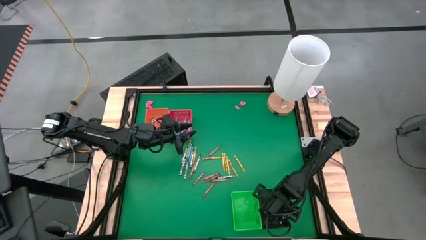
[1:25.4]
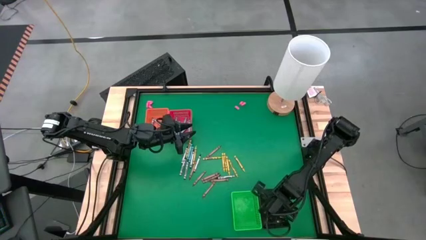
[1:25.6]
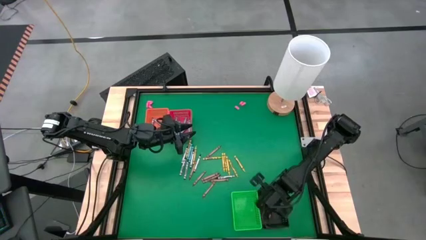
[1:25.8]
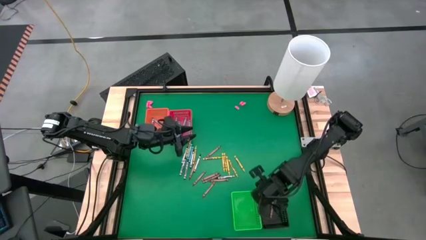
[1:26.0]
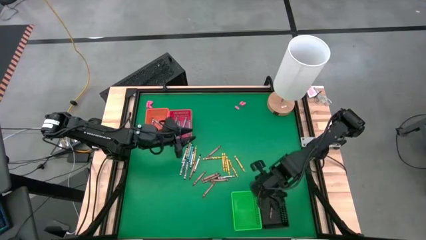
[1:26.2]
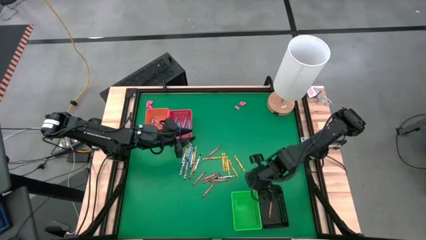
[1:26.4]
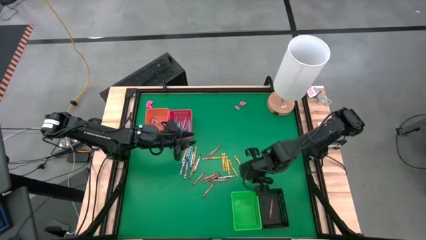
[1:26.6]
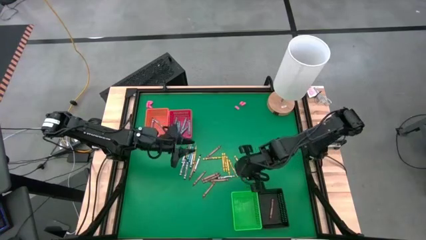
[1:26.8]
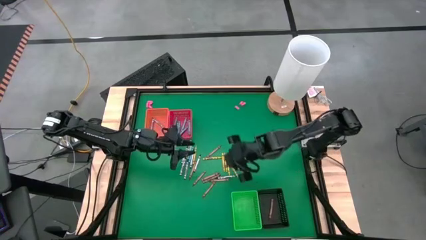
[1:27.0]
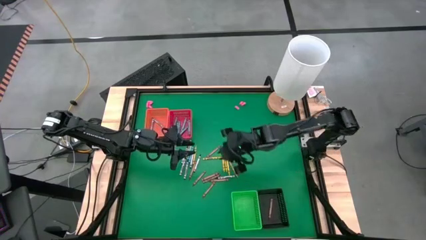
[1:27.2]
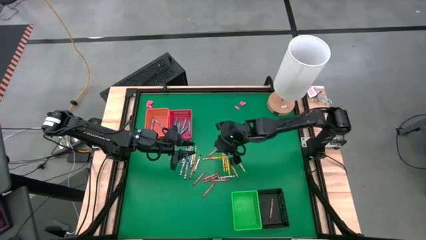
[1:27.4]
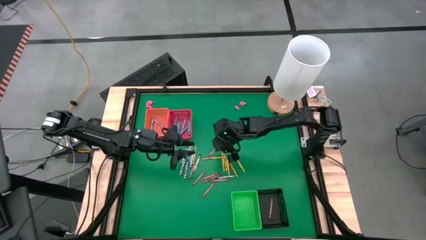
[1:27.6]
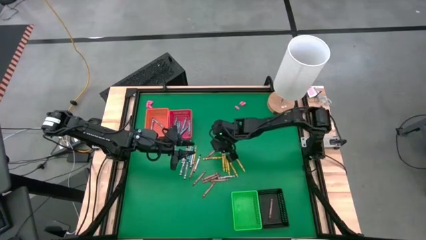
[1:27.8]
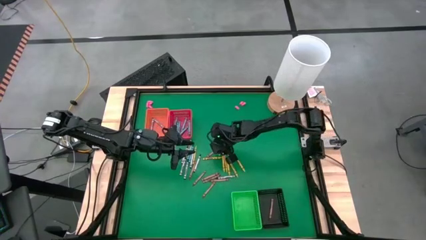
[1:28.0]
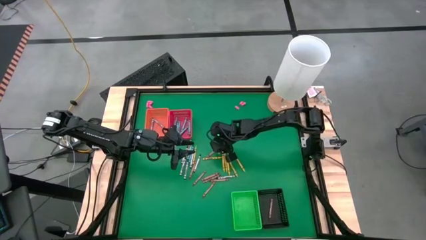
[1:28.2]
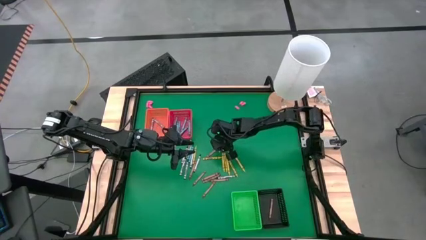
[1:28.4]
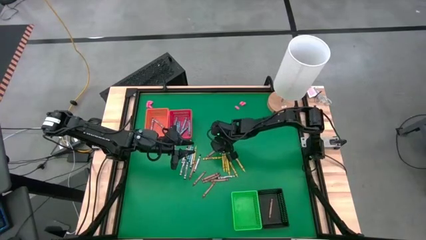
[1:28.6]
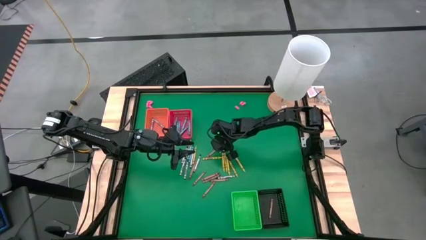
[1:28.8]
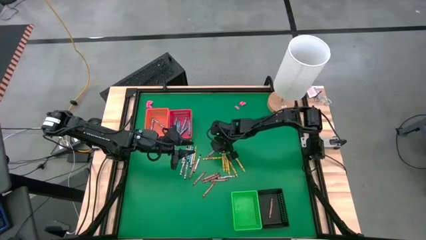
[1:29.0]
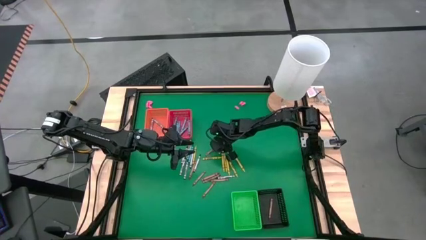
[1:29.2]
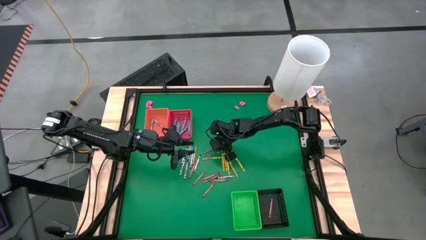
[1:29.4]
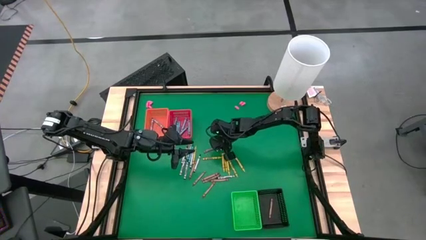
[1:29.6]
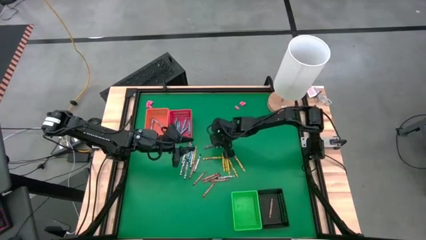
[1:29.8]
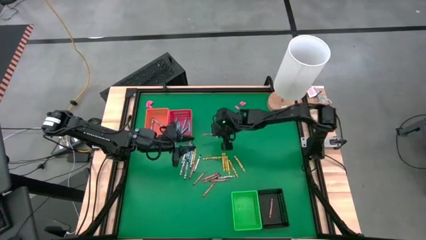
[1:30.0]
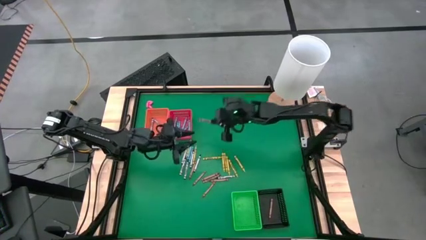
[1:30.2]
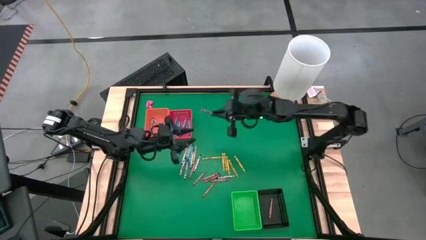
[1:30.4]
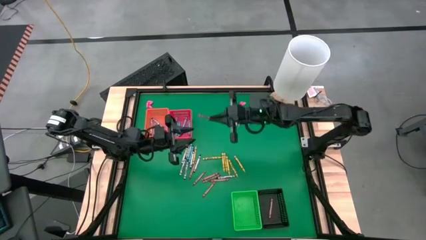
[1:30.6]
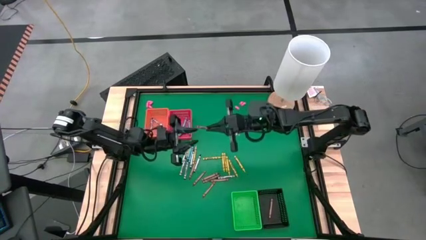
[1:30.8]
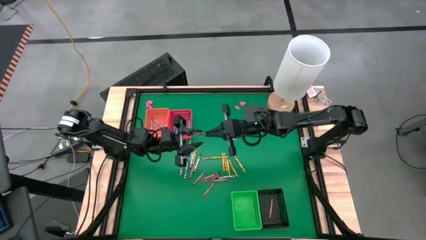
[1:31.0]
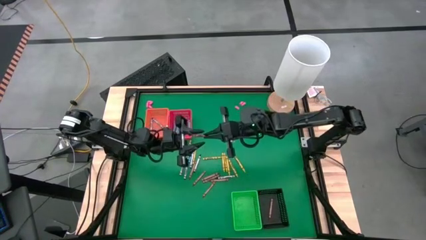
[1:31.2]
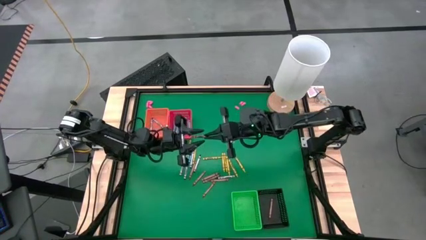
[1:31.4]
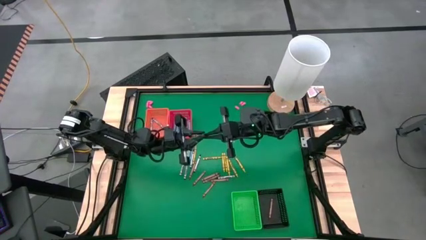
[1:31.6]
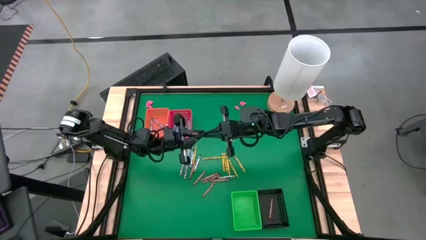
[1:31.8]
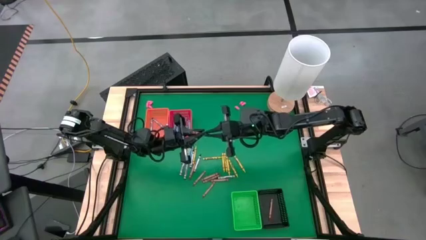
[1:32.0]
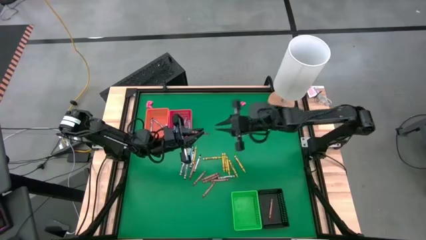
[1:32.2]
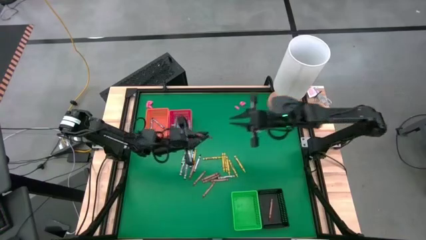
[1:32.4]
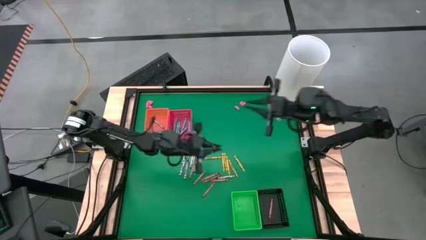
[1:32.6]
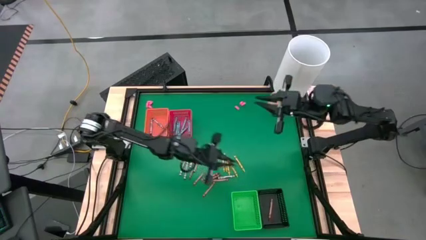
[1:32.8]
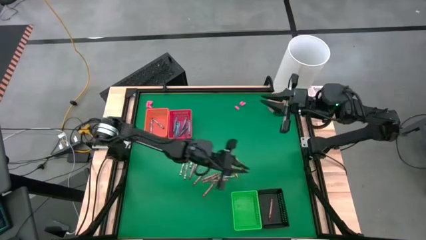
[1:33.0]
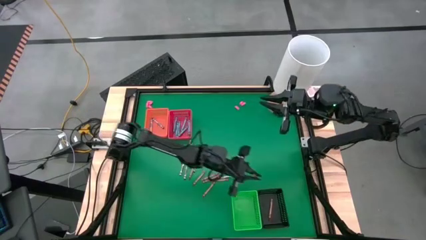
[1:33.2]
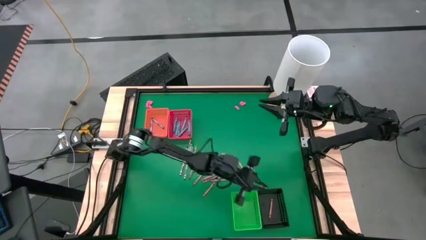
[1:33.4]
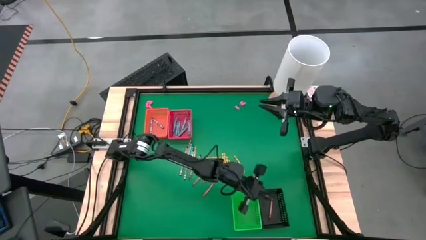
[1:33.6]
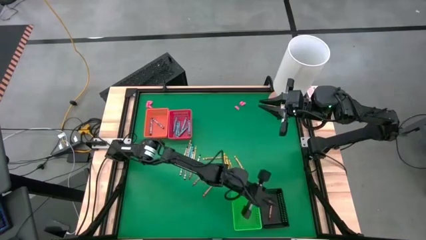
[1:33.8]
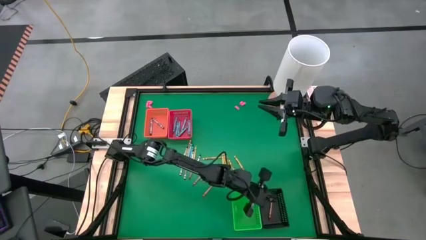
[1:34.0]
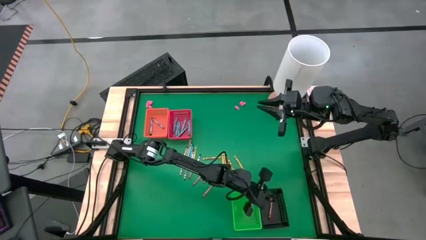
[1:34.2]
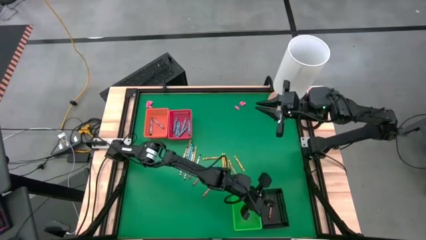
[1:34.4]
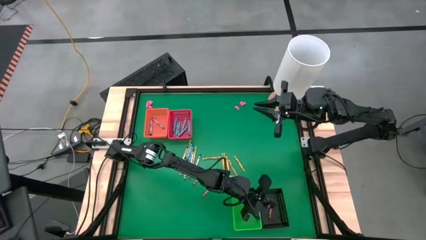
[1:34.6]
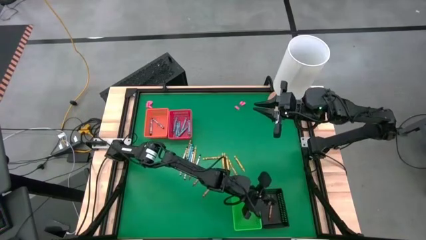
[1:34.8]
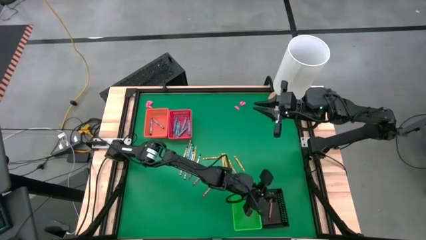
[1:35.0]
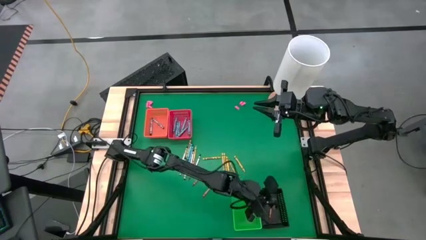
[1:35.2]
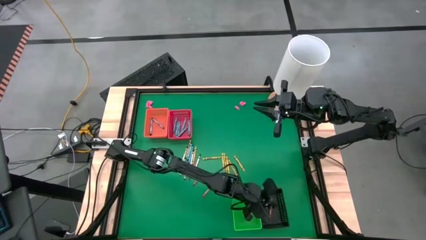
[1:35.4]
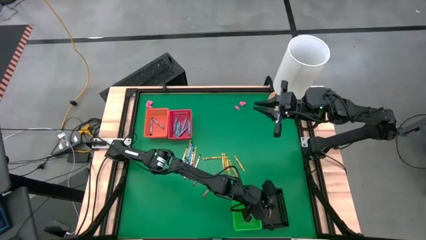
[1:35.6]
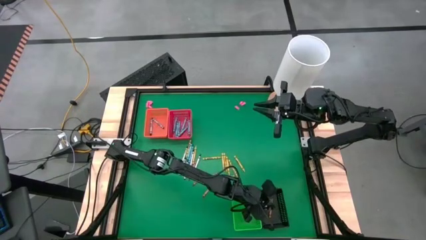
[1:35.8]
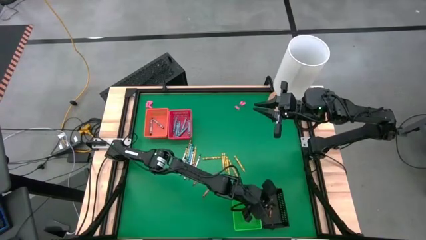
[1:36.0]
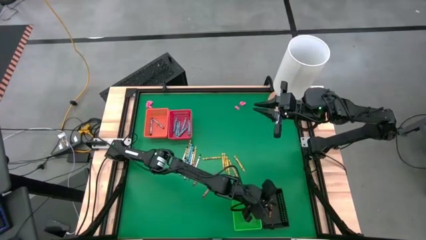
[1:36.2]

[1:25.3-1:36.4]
Task: Sort crayons
Put the brown crayon into the black bin

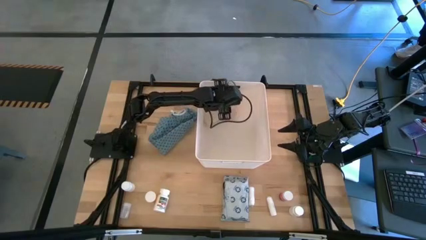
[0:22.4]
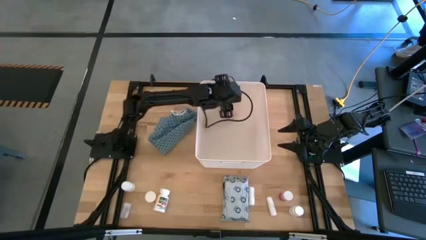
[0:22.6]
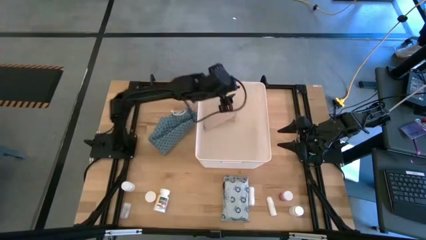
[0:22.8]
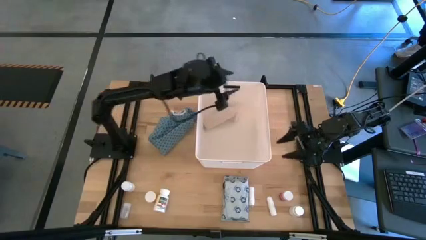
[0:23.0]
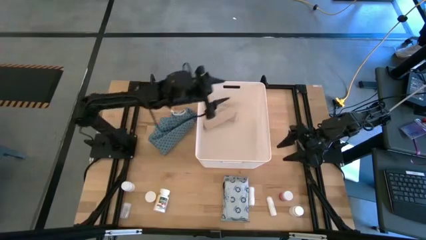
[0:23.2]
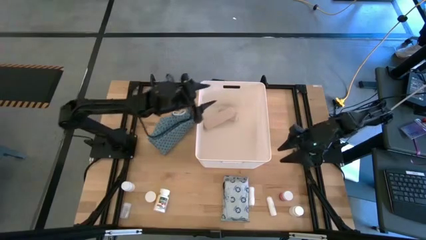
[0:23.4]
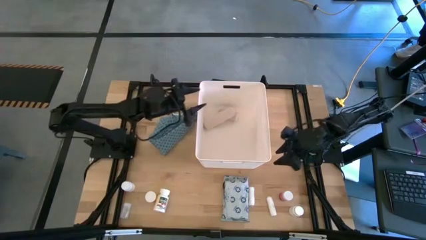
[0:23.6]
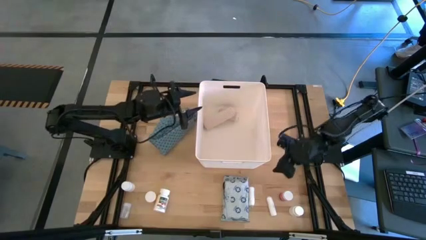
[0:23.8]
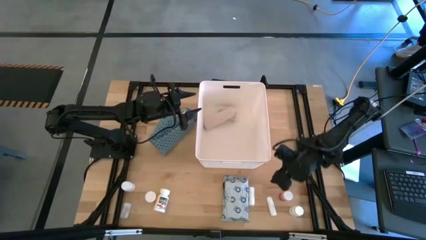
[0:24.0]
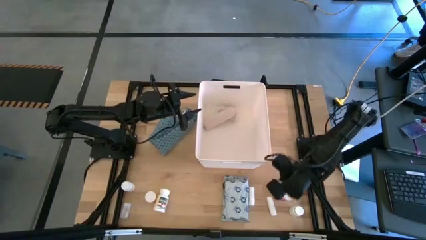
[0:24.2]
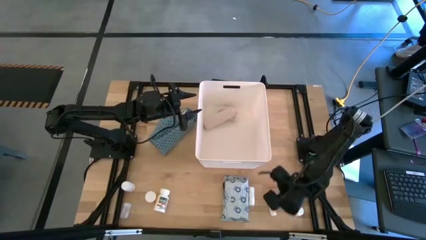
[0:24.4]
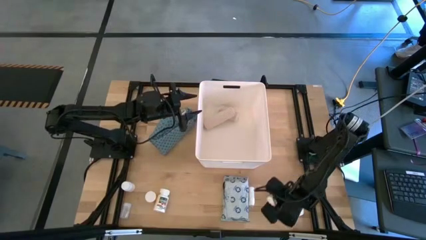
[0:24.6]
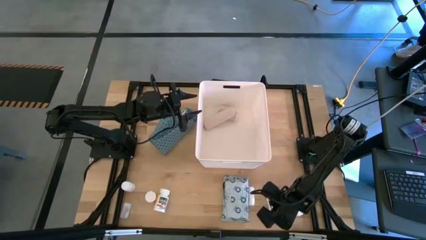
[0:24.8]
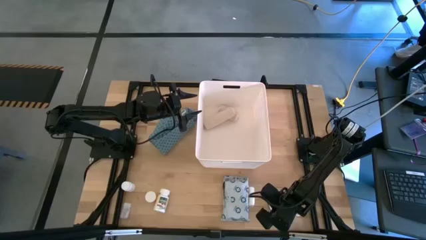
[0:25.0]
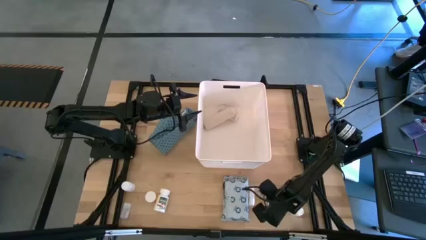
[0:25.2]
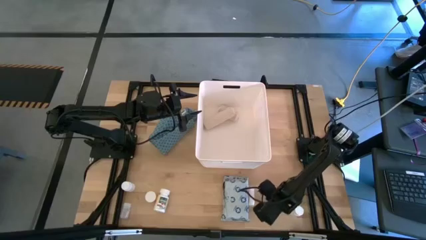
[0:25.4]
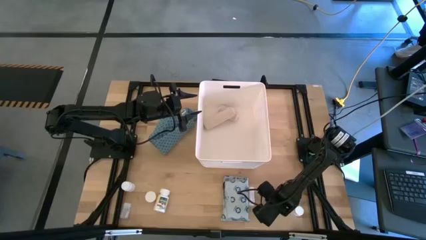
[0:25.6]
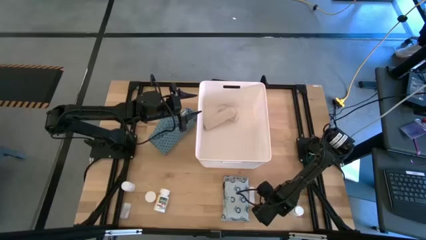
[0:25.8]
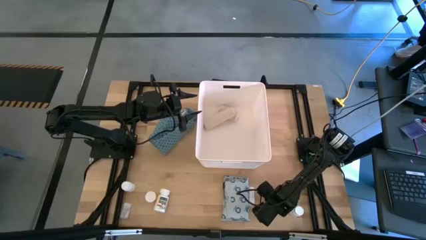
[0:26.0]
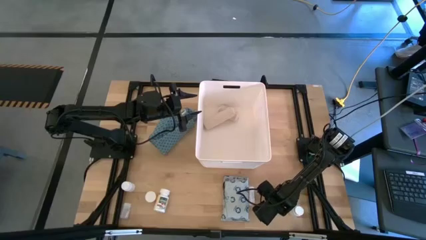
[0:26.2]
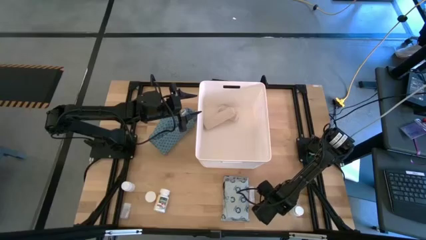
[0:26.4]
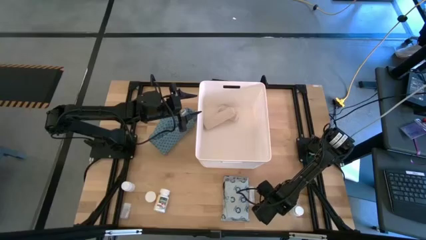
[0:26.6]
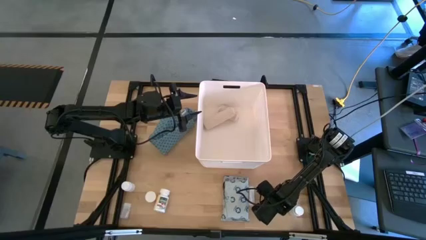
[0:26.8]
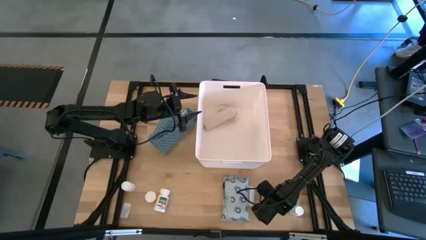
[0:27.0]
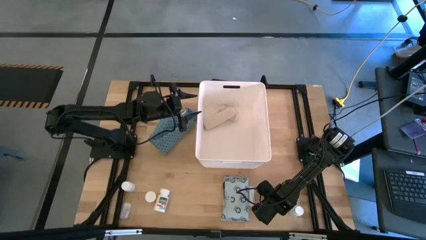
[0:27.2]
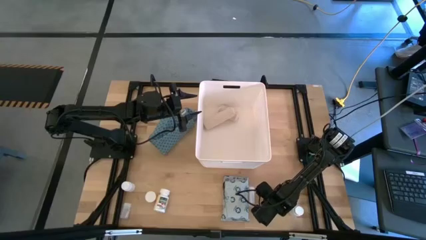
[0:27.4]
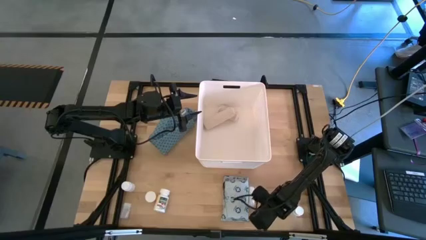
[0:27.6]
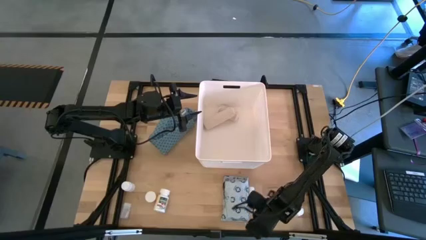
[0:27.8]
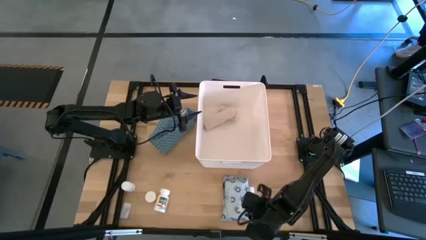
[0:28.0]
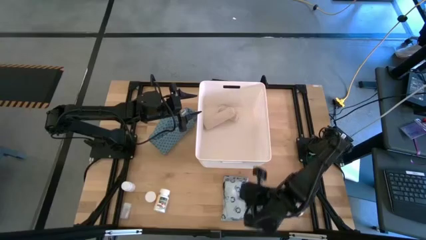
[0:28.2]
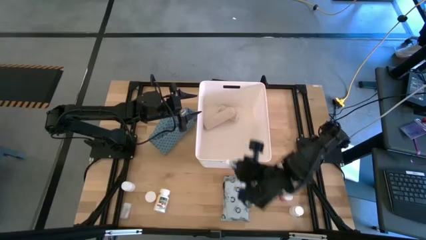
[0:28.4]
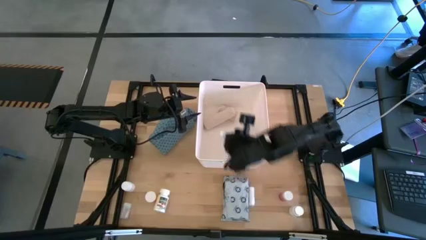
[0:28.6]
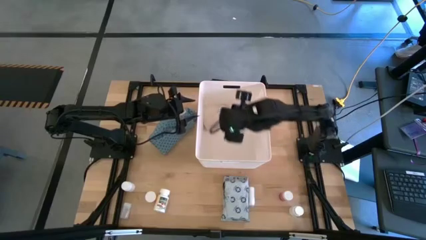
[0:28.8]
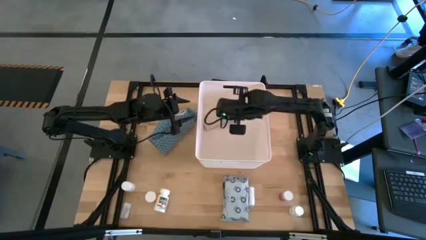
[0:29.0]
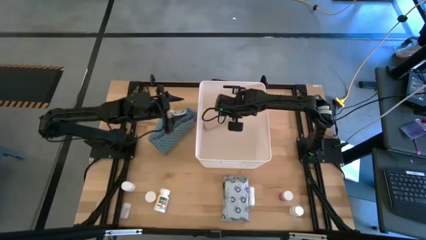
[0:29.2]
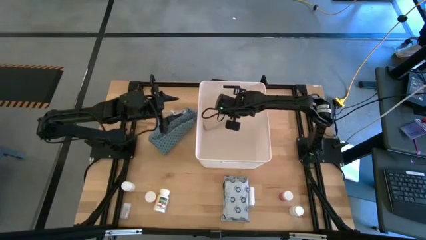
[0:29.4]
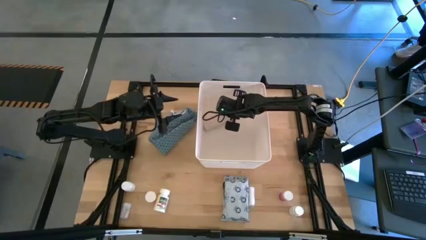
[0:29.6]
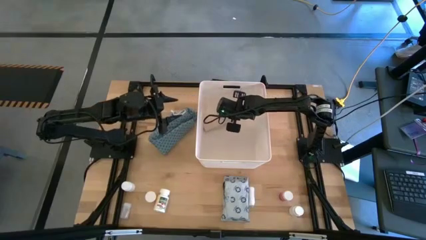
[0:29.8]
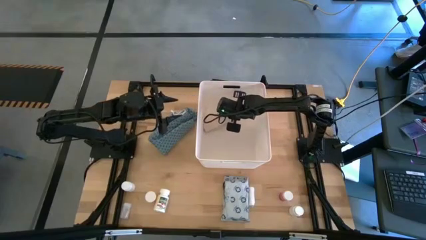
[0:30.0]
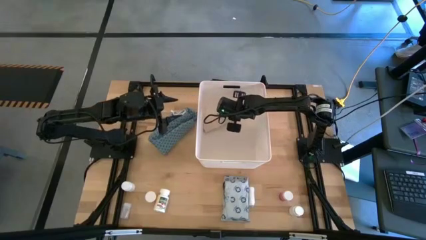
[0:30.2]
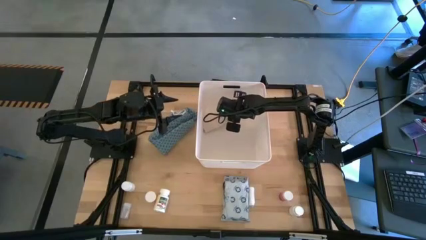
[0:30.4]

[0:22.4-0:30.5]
Task: Pick & place medical supplies in basket/bin
Put the right white rolled gauze into the white bin
